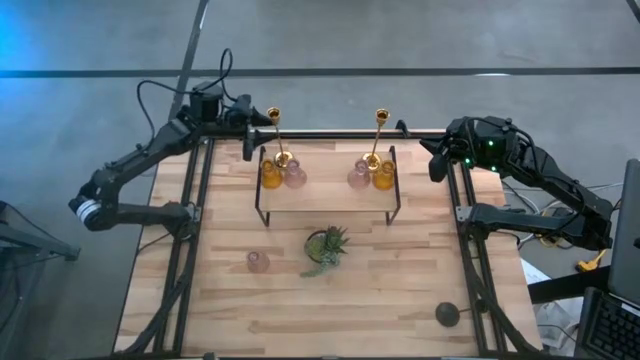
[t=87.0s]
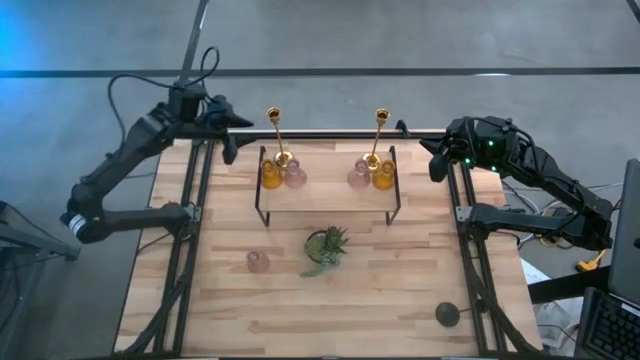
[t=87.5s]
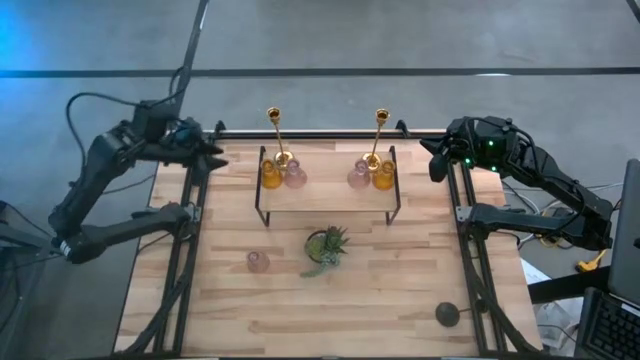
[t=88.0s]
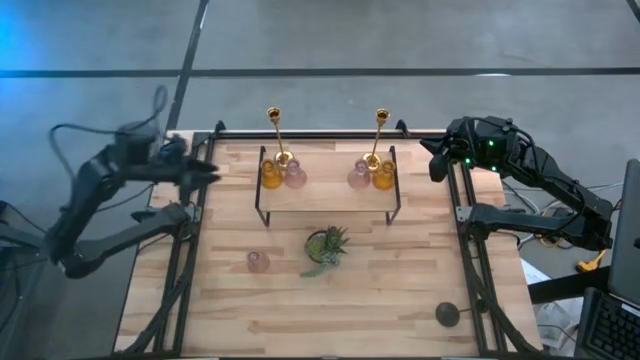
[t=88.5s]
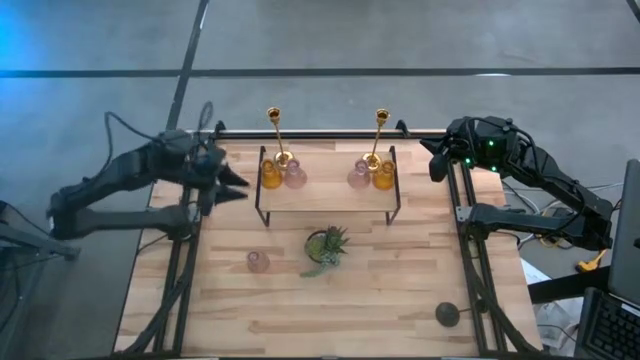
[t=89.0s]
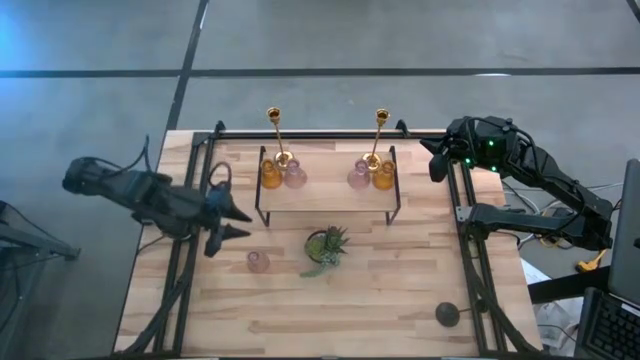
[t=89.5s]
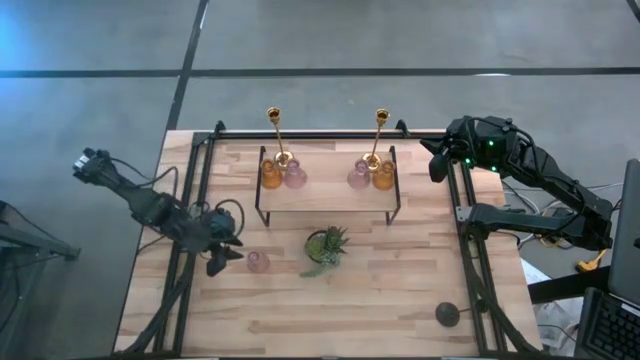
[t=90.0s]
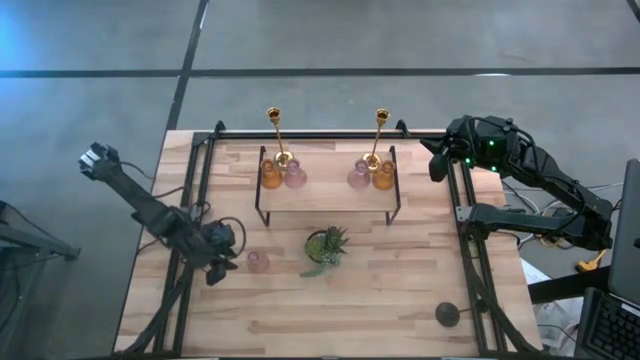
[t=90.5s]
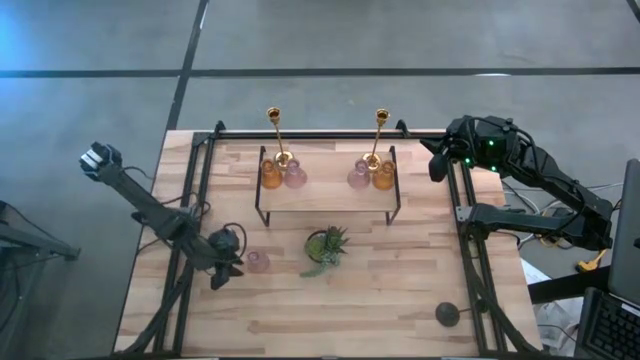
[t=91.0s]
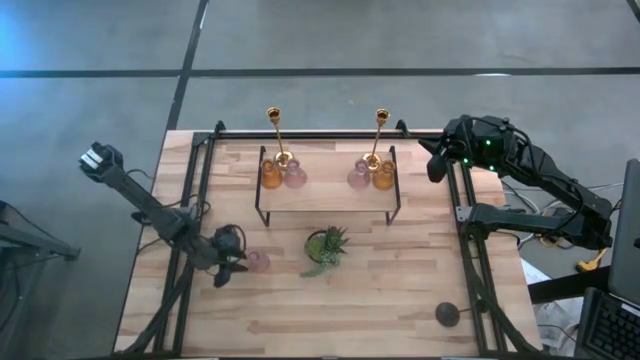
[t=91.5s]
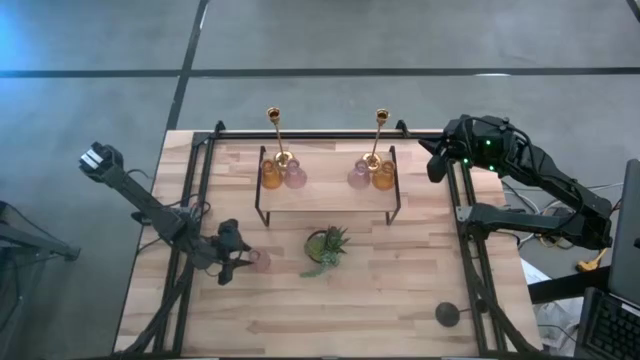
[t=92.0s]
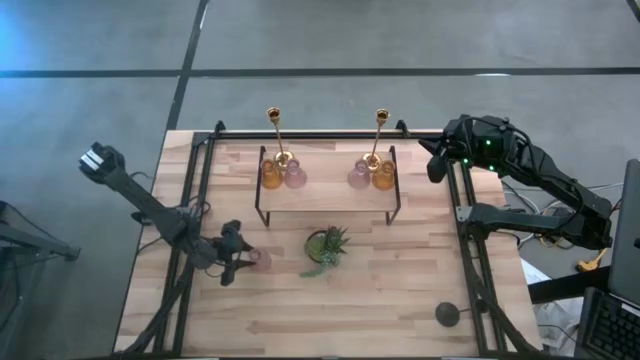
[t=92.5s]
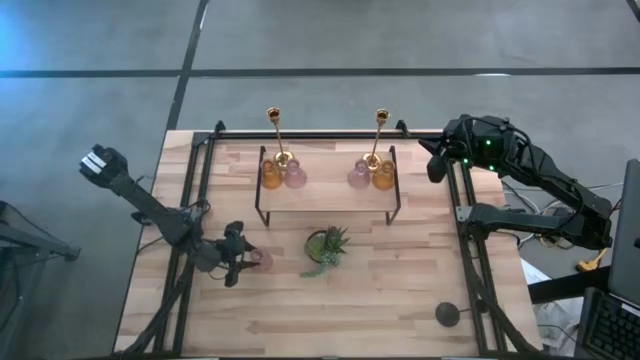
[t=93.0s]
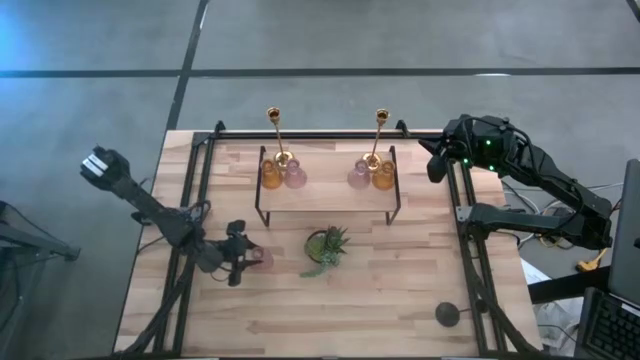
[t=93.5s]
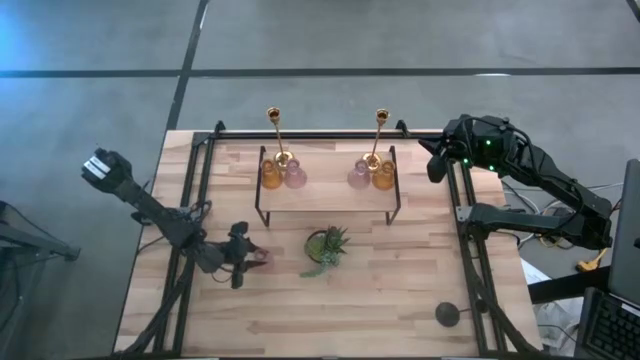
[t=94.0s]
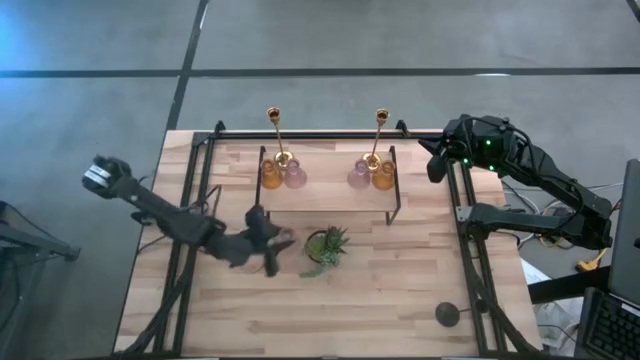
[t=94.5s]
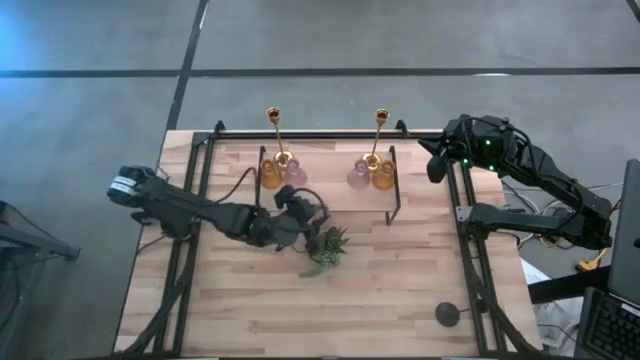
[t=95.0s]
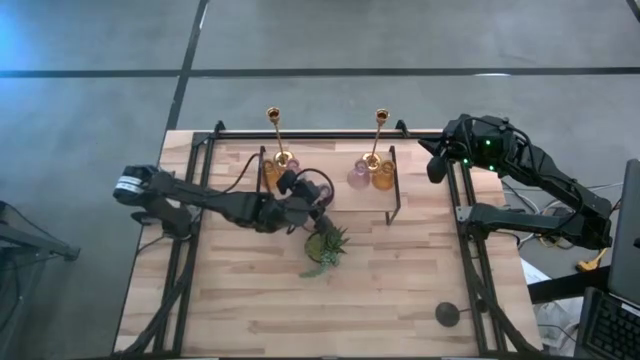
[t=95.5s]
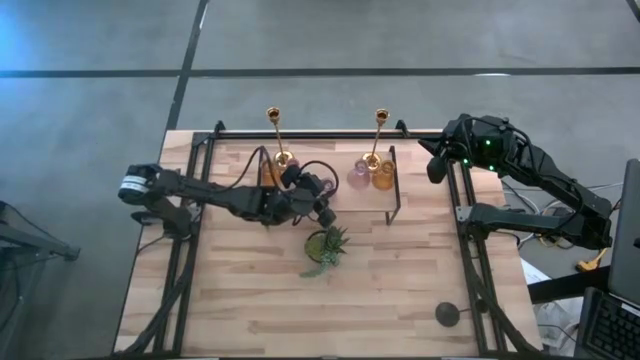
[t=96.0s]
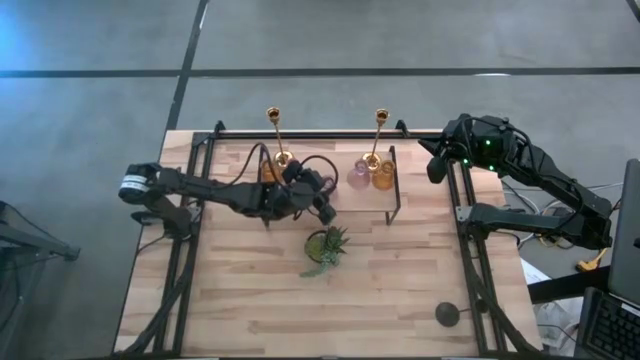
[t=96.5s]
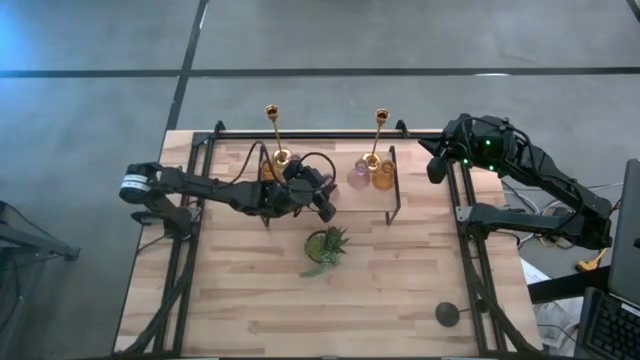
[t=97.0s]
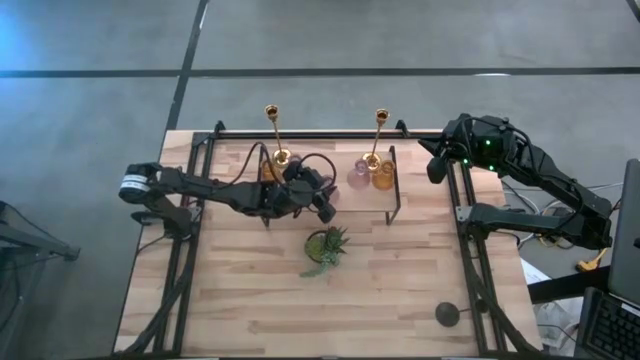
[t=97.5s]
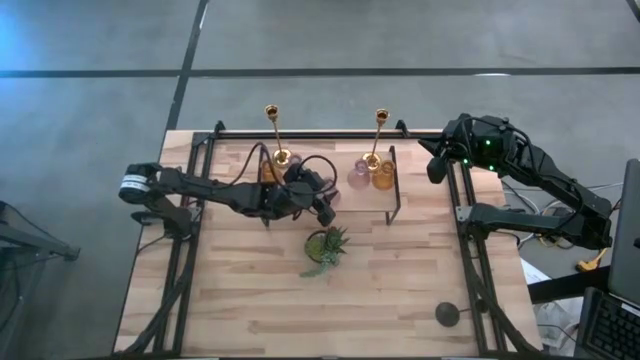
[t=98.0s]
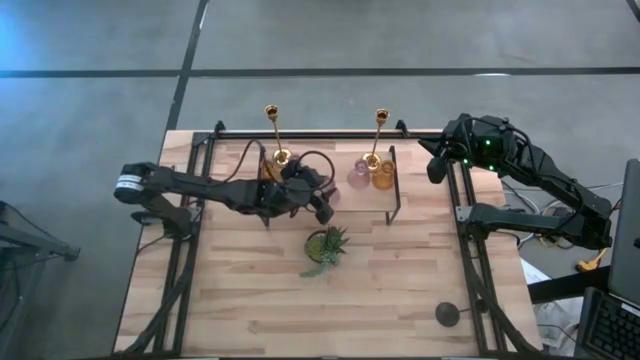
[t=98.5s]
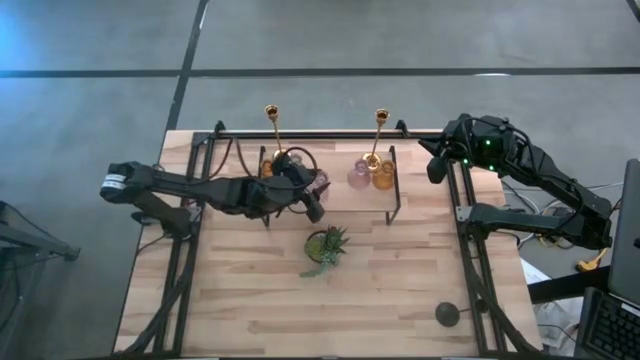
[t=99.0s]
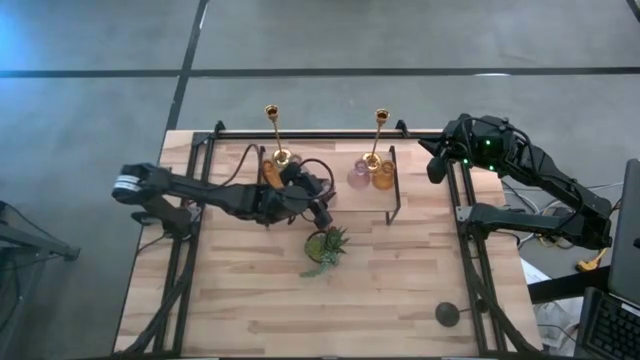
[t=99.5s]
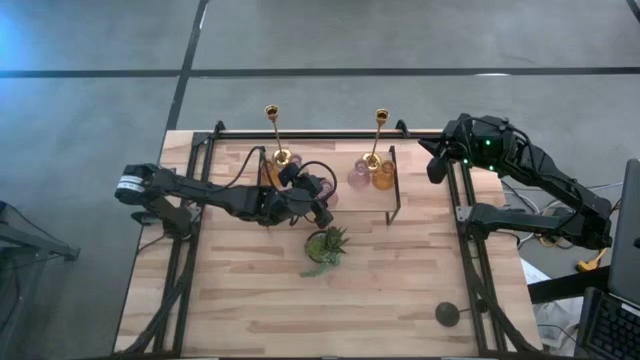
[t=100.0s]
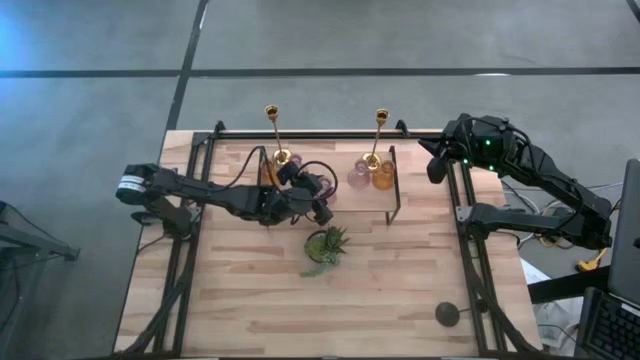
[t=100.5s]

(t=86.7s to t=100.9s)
Task: Pick & Place candle stick holders
Put the pink glass candle holder on the shelf

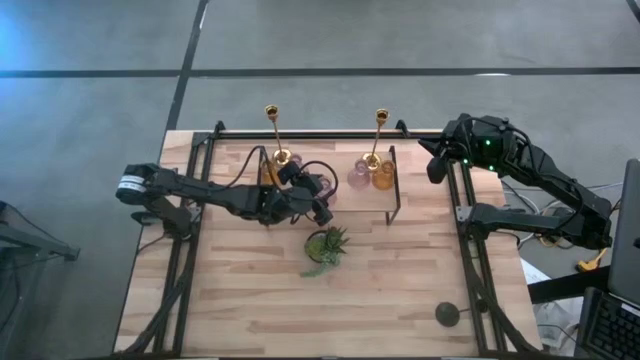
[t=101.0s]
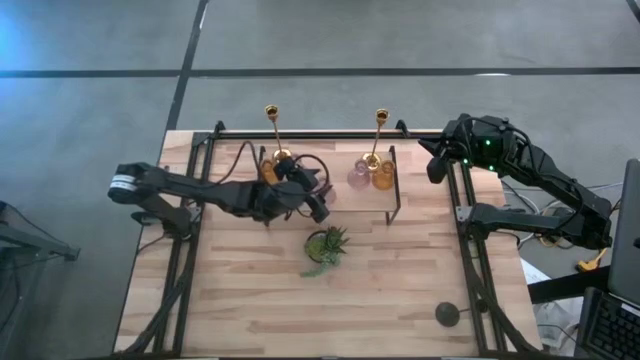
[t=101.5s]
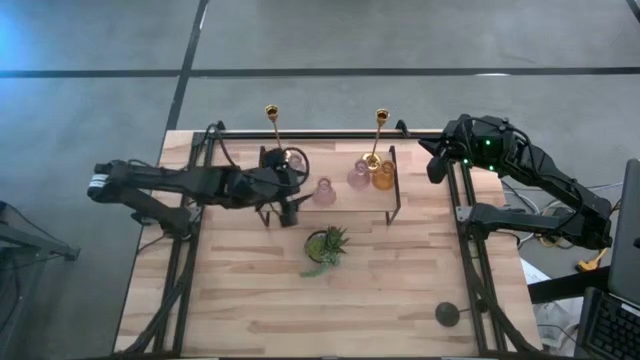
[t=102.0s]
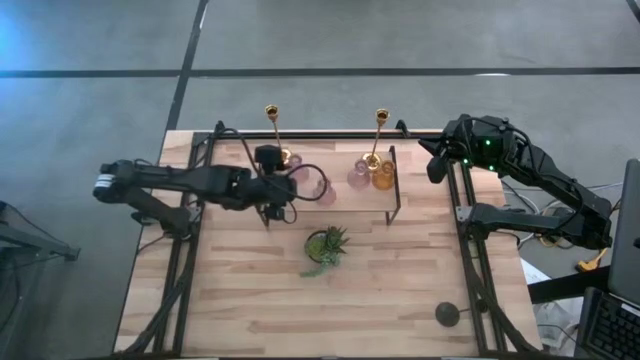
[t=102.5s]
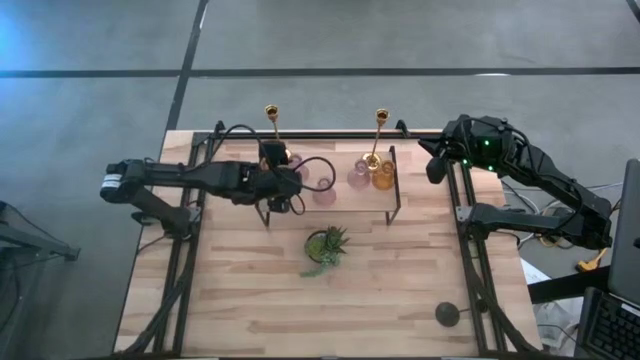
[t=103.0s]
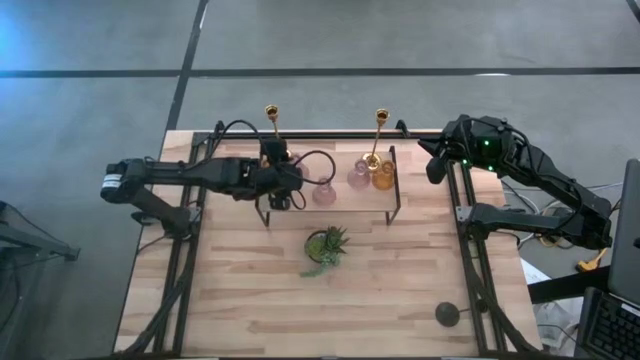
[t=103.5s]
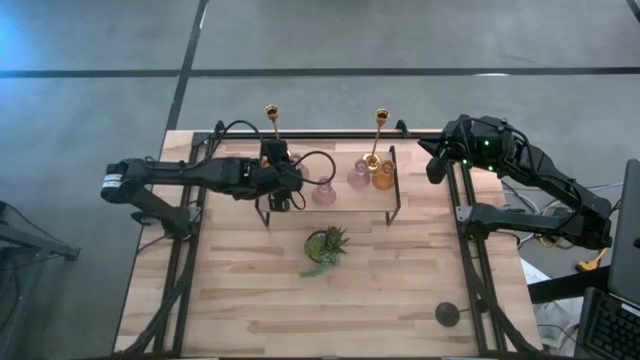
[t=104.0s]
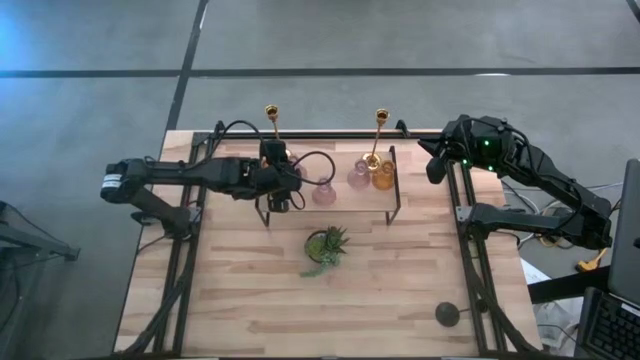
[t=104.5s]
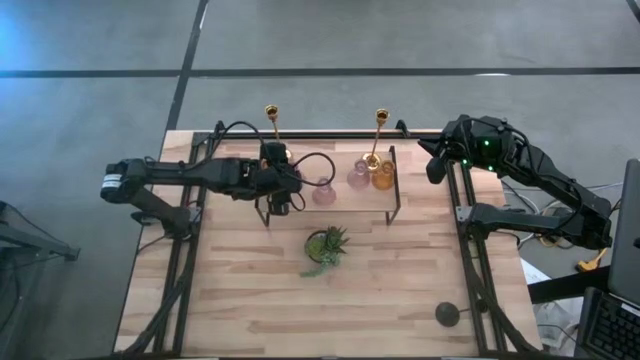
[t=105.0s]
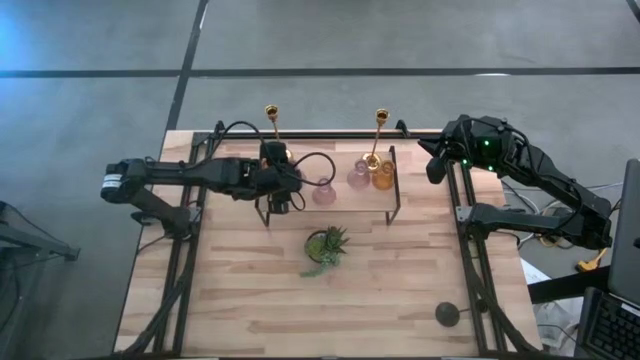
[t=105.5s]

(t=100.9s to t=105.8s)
Adjust the pink glass candle holder on the shelf

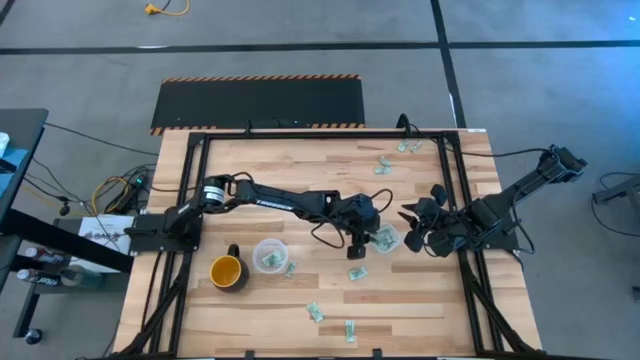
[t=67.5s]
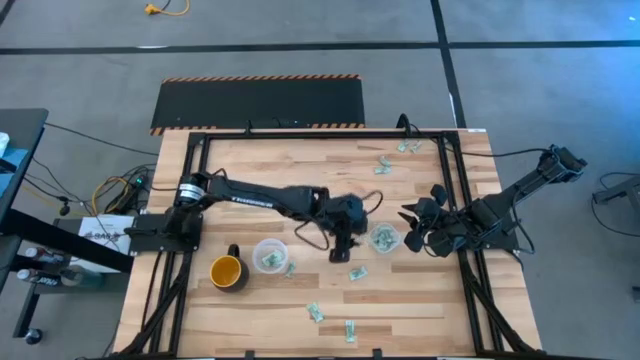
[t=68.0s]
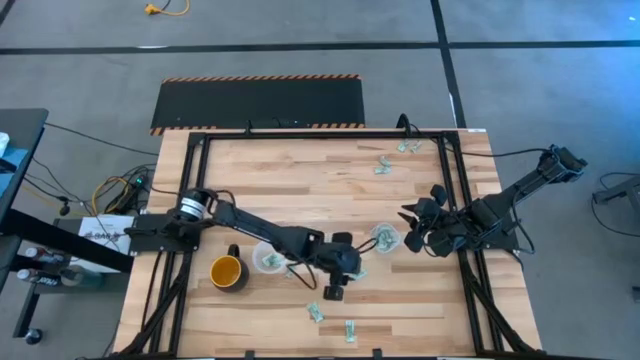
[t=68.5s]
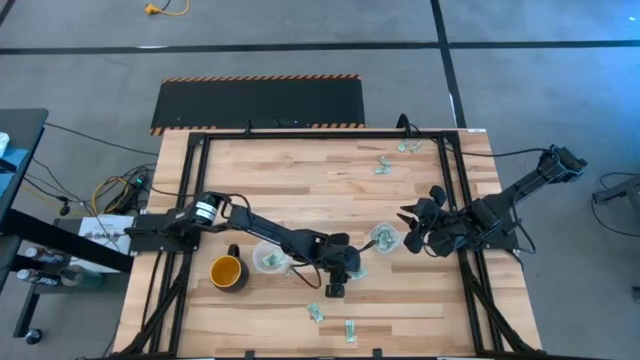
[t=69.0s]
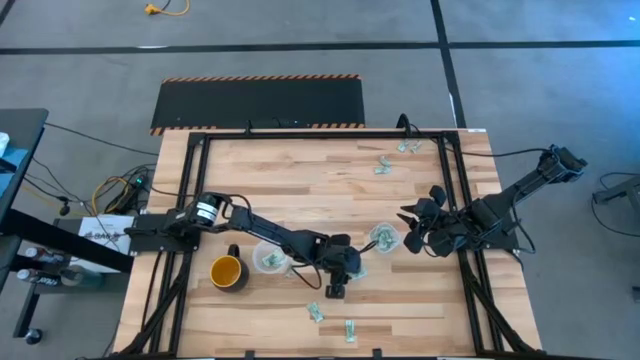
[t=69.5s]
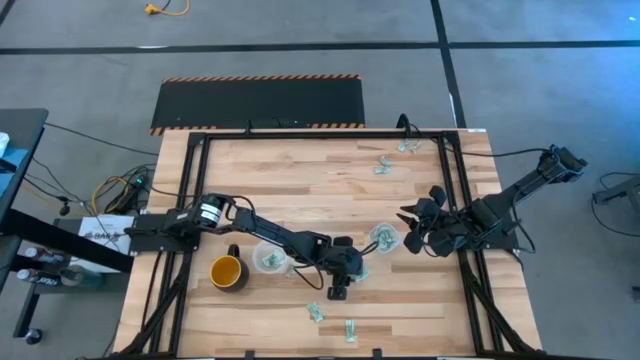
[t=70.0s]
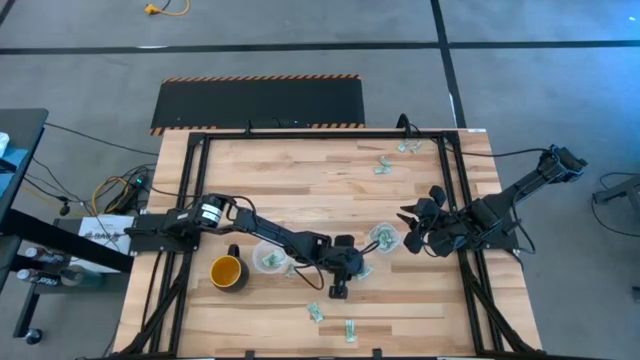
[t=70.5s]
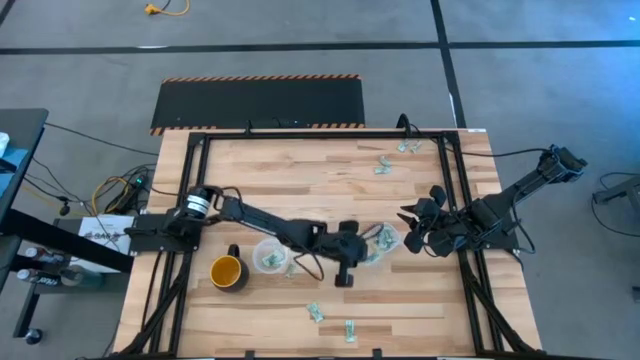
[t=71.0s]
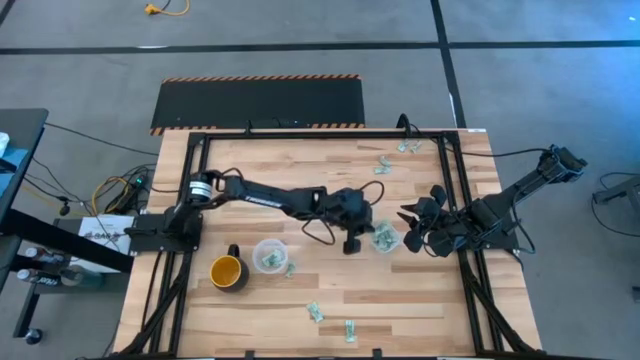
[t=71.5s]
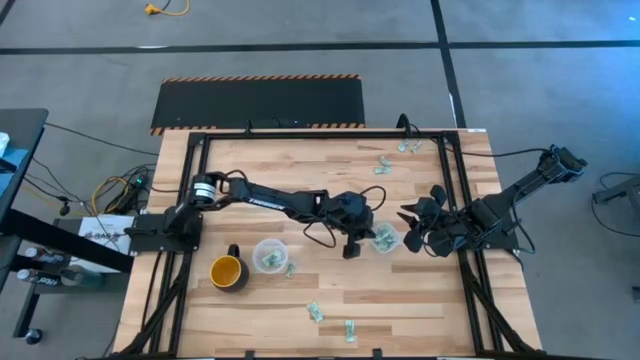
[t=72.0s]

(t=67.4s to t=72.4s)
Task: Pick and place Stevia / Truvia into bins
Put the white stevia packet into the square transparent container
